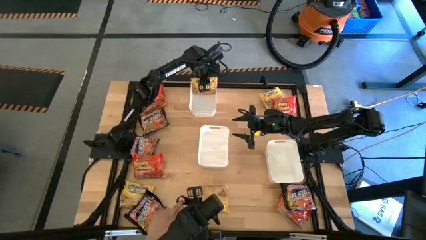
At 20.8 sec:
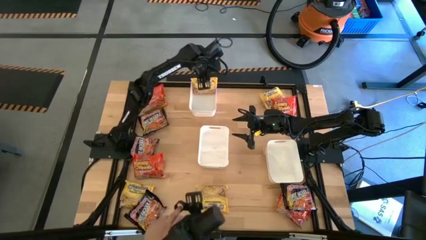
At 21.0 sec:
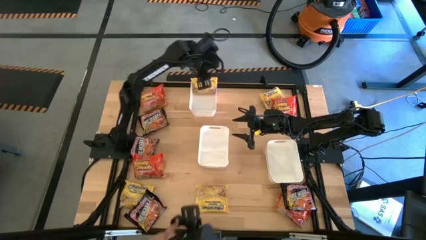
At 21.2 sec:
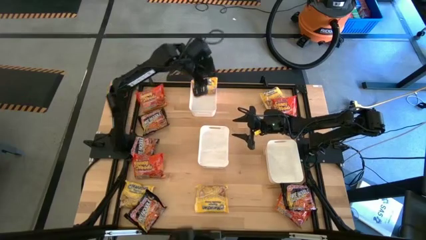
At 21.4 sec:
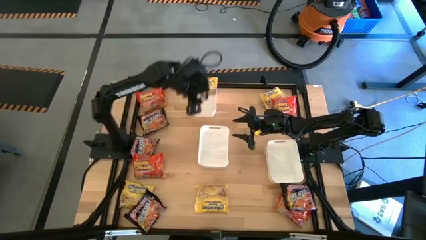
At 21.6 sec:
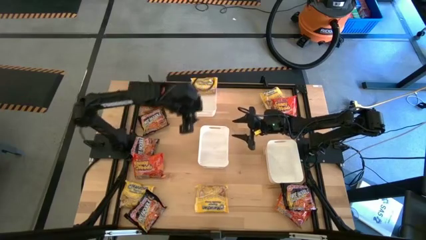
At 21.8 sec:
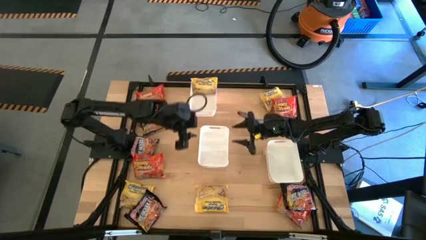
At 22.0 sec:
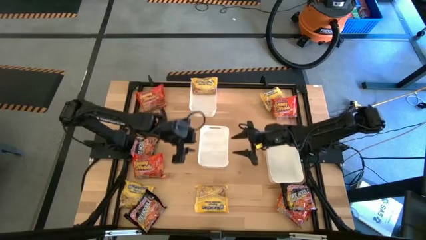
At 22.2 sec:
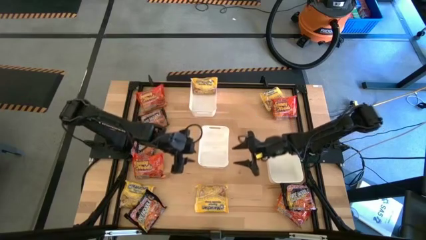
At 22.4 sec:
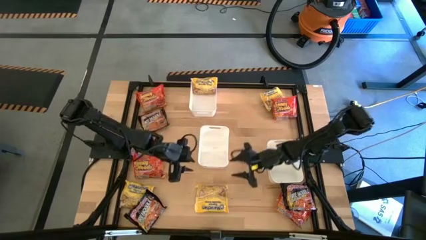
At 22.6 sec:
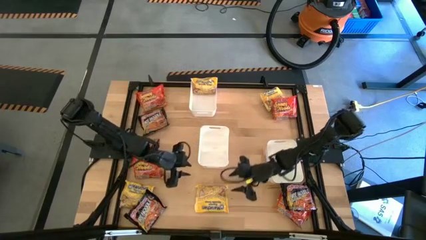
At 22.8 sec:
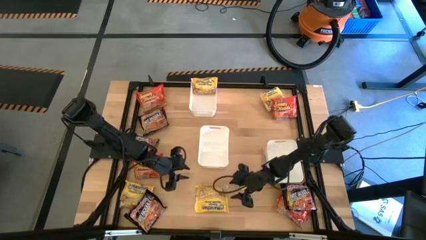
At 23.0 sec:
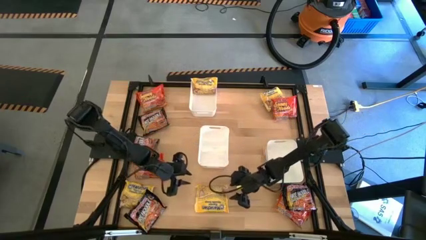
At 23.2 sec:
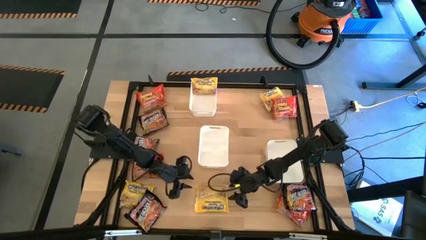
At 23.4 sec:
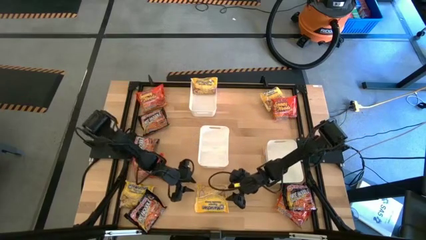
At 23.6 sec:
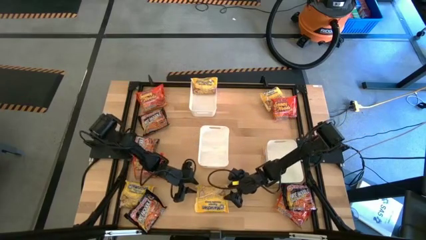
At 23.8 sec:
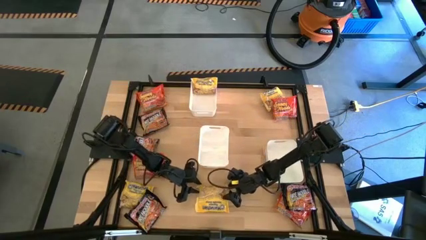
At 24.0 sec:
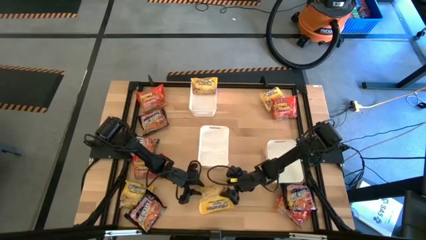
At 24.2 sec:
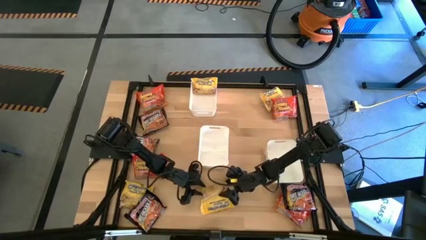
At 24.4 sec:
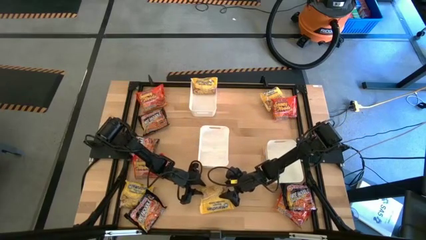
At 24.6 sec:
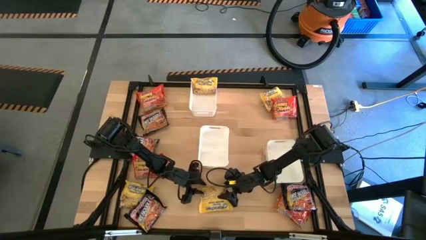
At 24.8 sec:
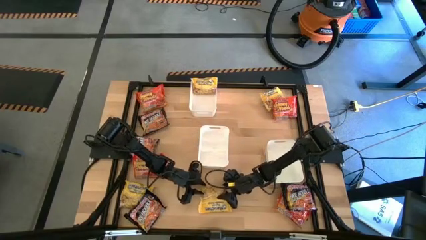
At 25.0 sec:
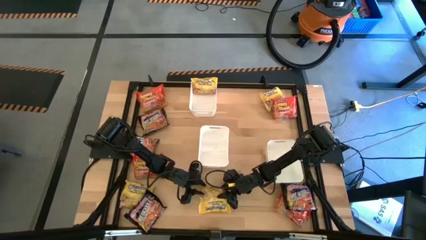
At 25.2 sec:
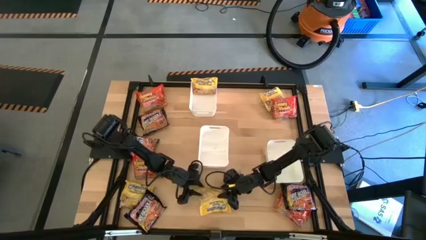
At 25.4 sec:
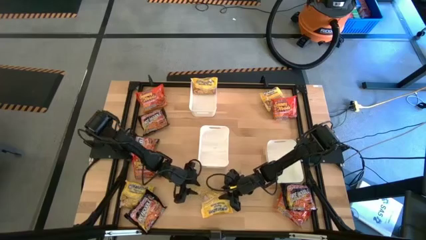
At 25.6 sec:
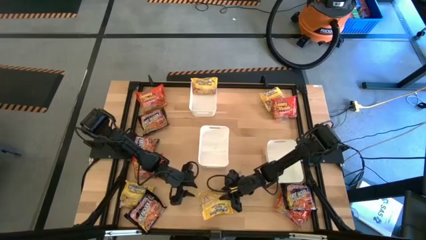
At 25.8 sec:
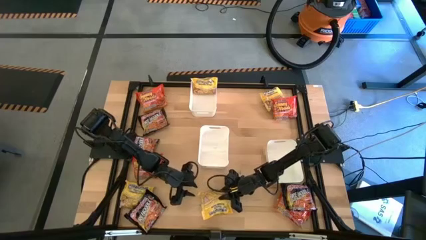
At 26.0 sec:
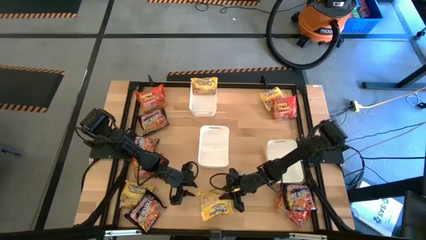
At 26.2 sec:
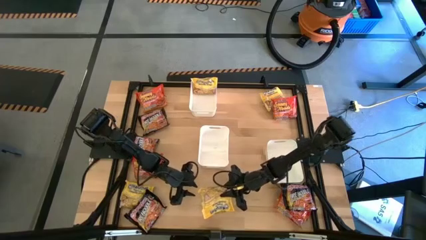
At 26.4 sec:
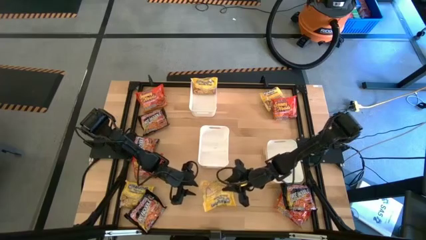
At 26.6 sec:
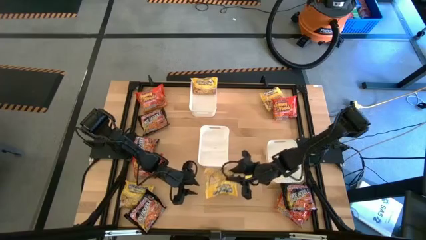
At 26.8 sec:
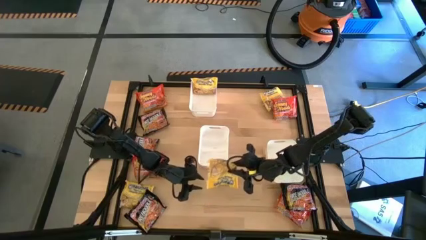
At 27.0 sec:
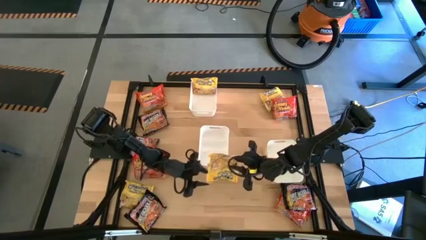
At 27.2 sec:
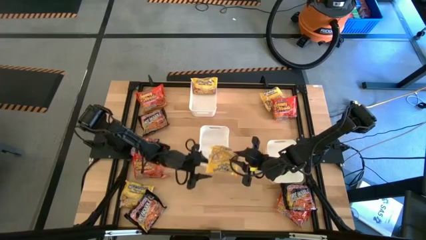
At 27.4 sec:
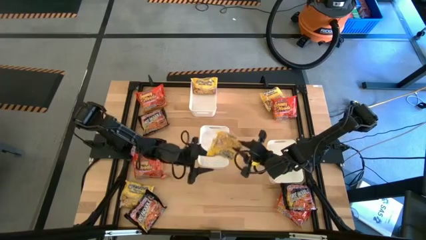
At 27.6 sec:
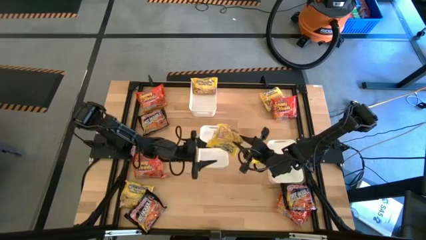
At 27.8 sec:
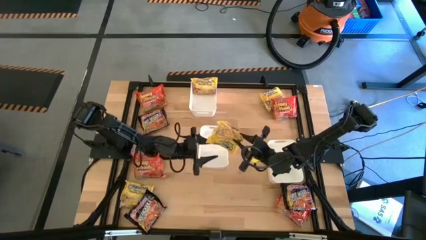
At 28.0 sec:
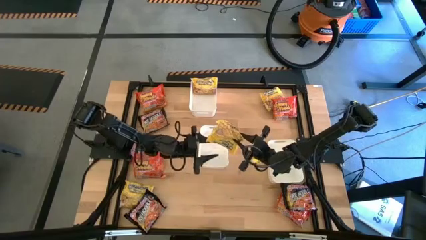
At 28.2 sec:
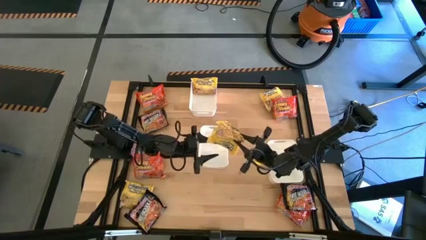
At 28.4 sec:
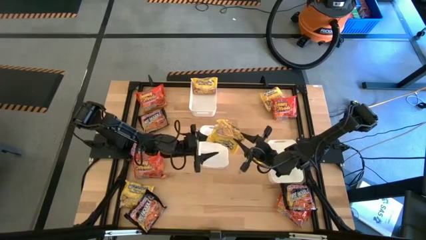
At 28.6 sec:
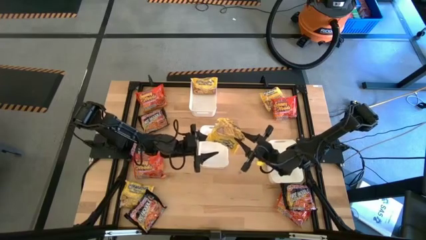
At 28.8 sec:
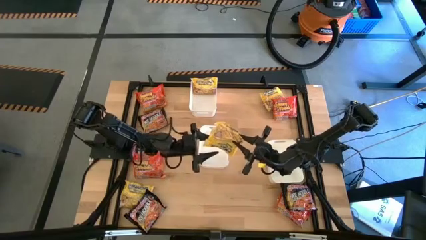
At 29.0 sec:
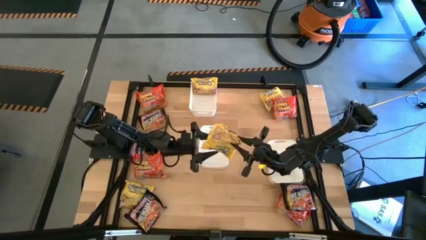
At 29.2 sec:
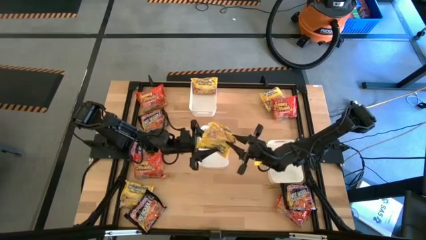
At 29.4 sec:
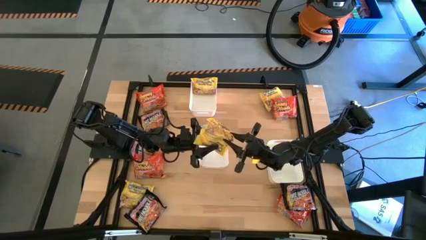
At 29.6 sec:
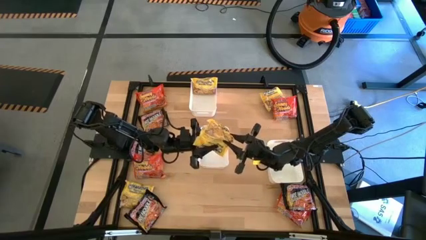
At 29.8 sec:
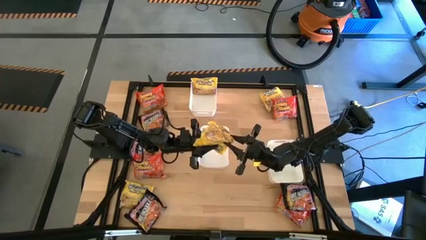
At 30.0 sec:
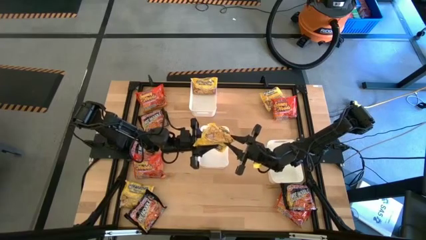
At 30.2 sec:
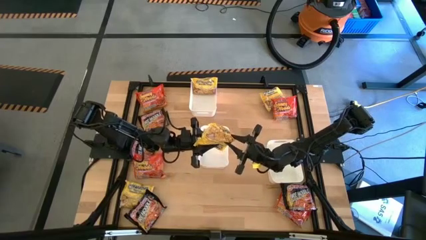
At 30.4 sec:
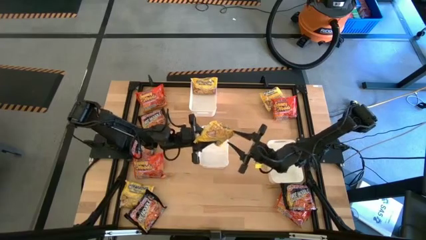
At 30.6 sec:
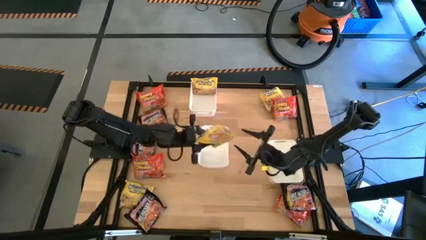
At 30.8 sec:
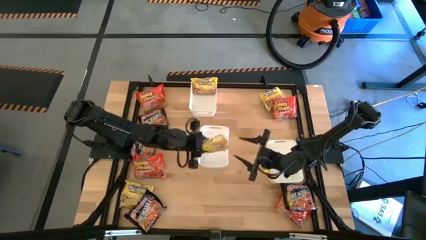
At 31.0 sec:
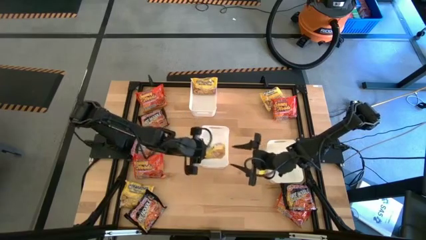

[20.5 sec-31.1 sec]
Task: Sort Maruchan noodles
Put the yellow noodle pack into the top white bin
